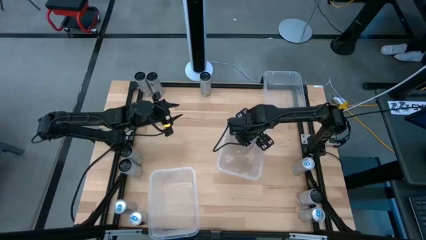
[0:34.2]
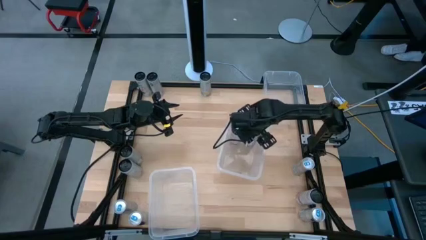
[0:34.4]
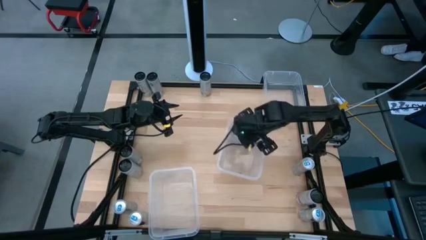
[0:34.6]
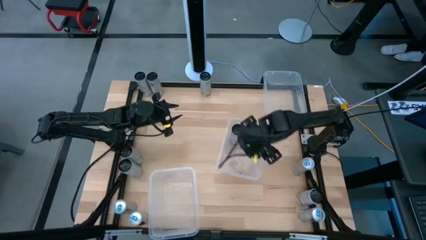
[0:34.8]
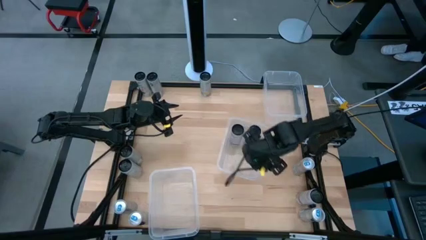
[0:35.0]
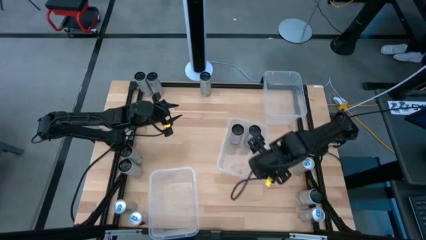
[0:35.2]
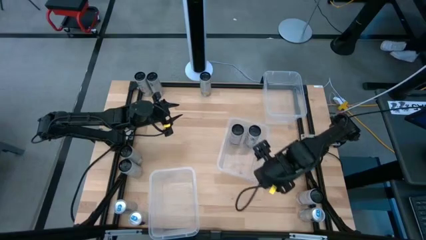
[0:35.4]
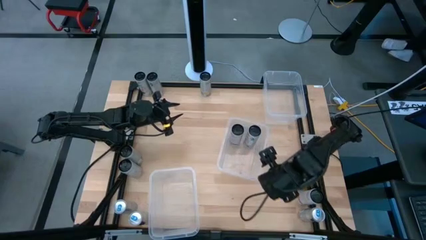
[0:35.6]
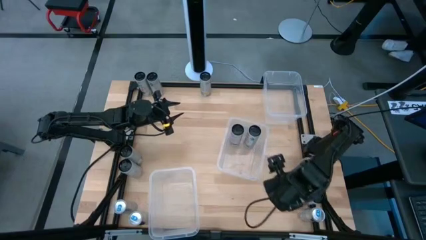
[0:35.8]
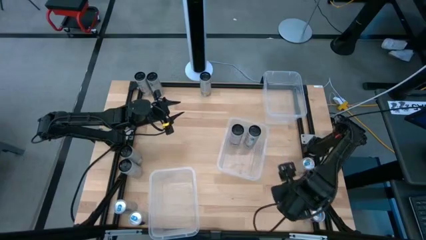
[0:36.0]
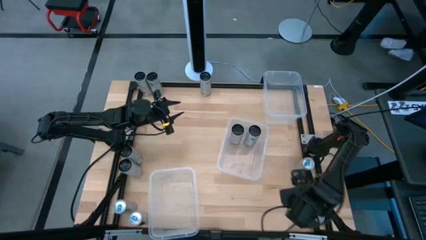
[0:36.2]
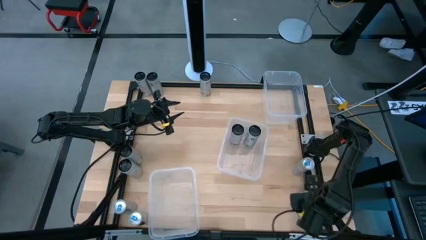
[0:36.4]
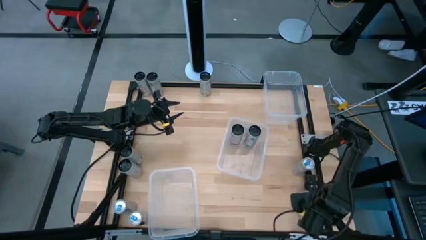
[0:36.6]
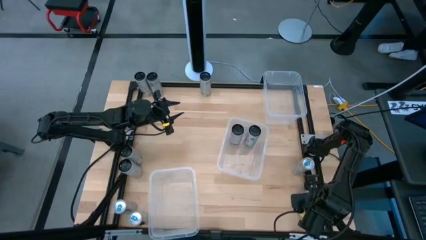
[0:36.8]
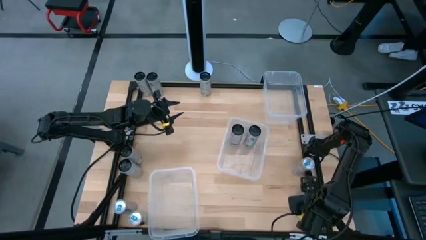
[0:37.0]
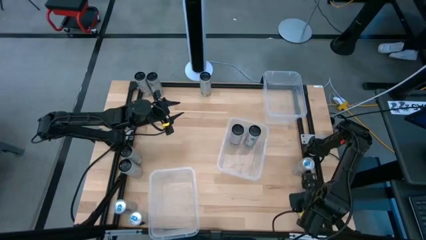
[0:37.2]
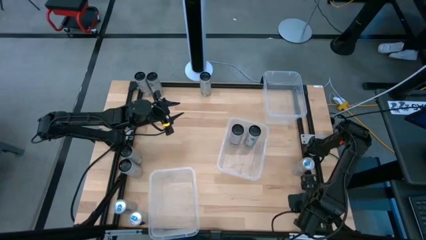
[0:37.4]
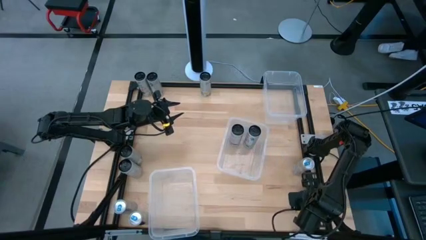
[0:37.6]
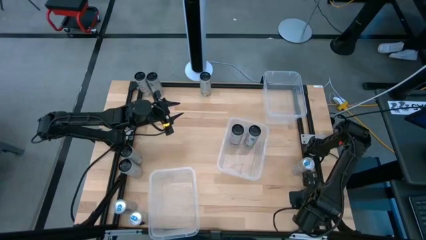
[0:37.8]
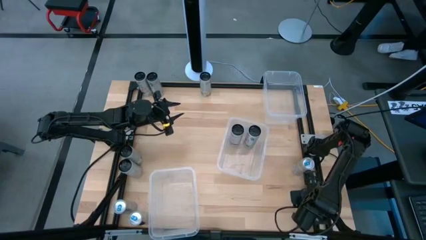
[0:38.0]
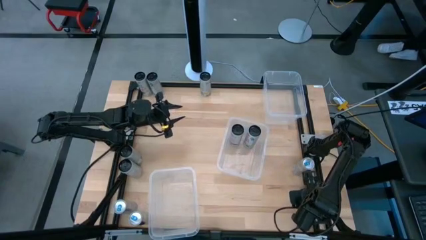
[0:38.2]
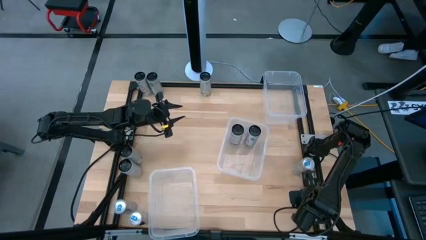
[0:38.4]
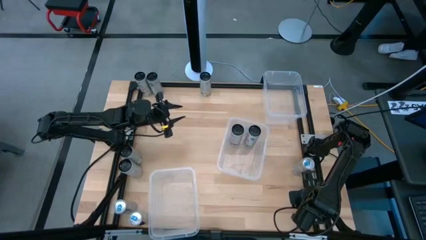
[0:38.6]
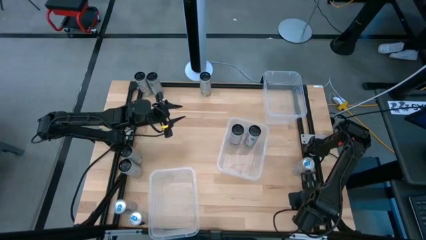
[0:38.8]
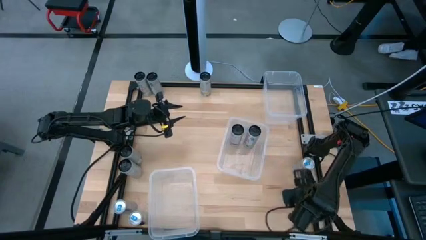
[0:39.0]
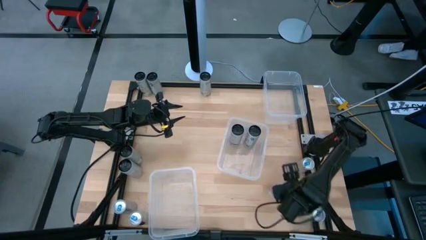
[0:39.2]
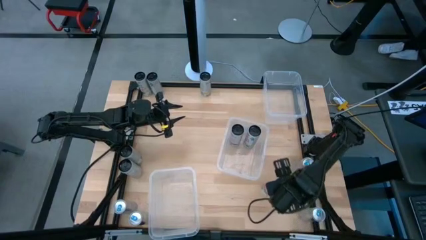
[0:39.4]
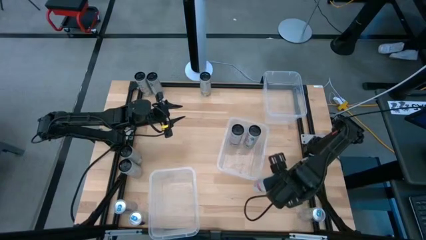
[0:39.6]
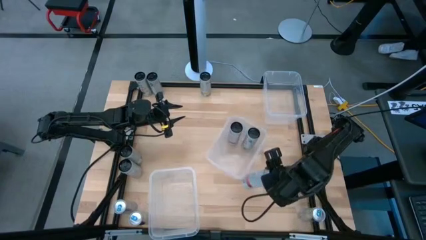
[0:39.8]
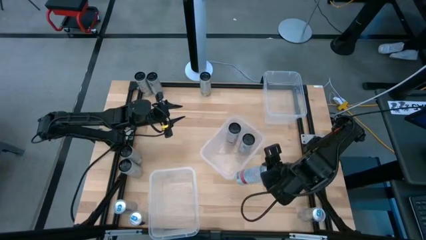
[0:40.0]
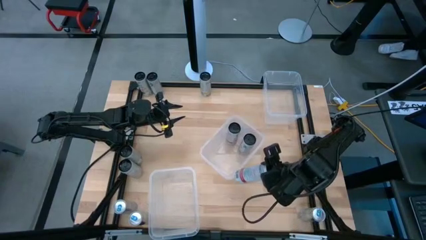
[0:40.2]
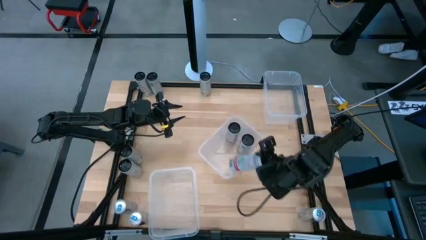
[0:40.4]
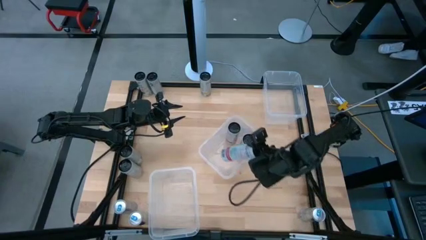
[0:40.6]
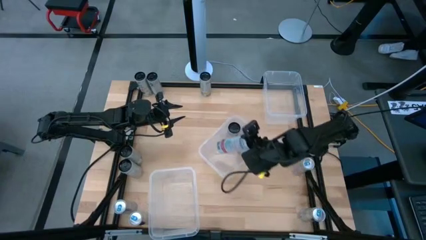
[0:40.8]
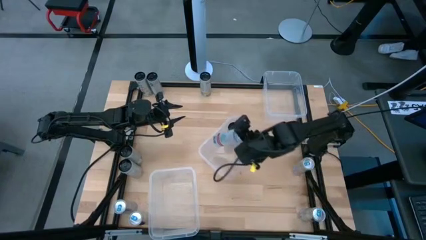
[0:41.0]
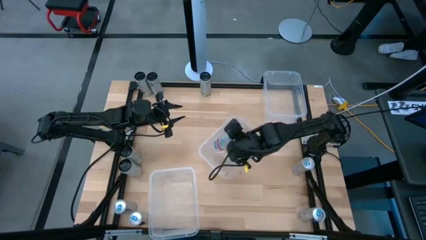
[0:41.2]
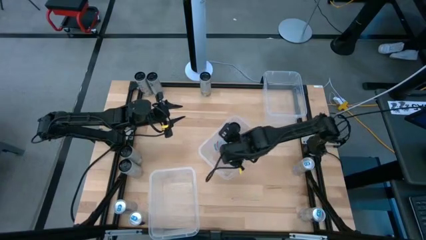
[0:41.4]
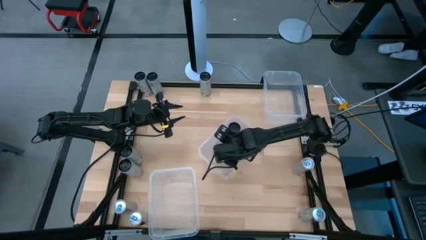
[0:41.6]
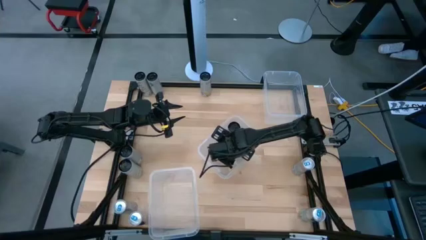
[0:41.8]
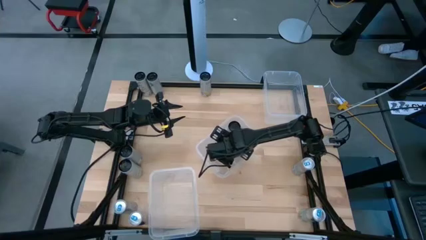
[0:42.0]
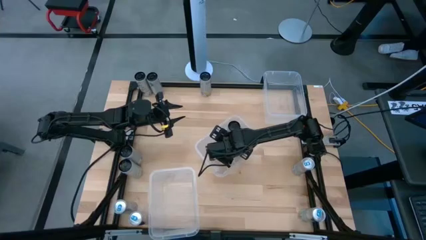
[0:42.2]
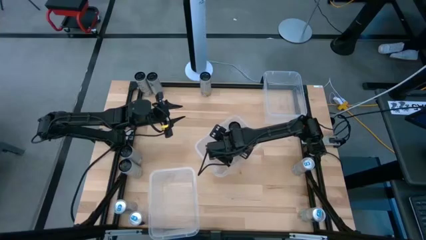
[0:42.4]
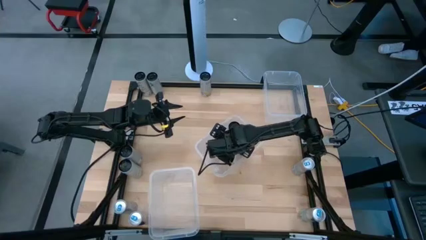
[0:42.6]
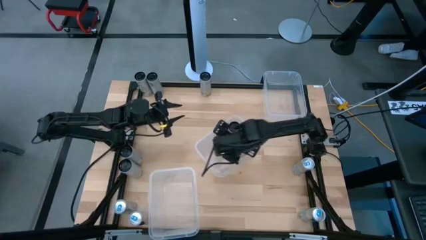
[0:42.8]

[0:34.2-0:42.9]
Task: Sort soda cans
Put the bottom right white and black peach soda can into the middle transparent bin

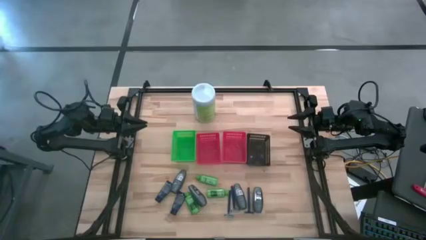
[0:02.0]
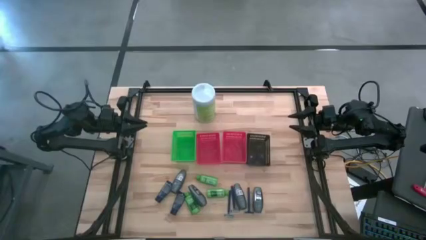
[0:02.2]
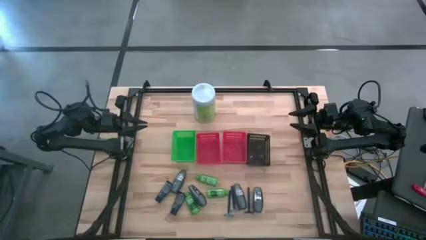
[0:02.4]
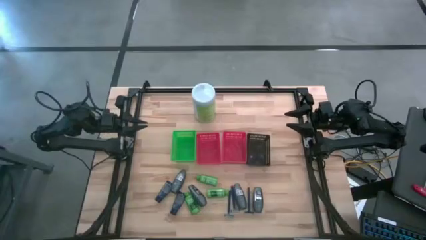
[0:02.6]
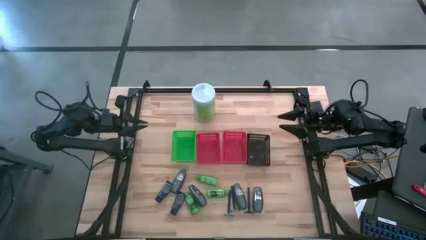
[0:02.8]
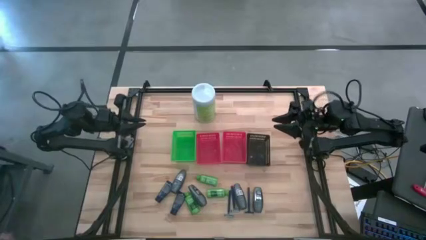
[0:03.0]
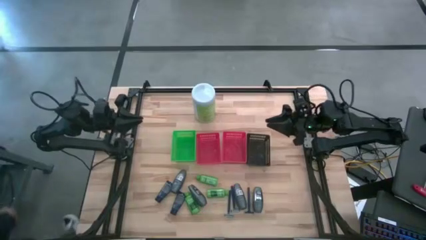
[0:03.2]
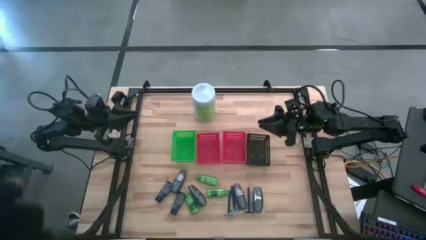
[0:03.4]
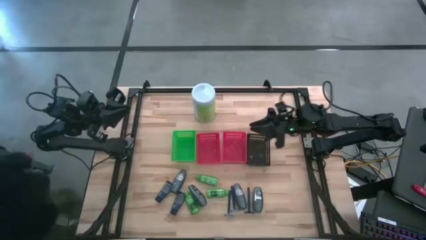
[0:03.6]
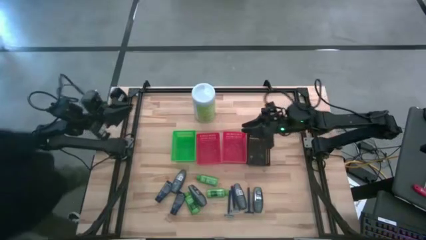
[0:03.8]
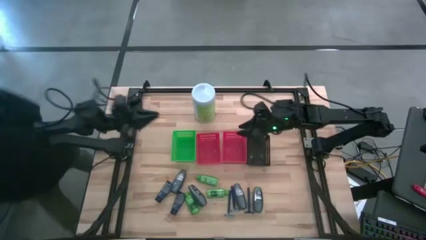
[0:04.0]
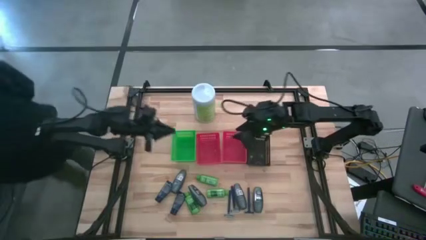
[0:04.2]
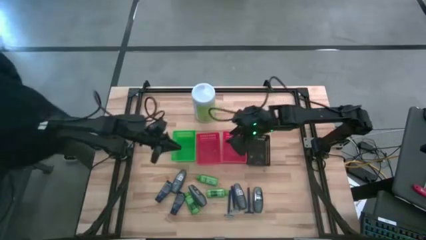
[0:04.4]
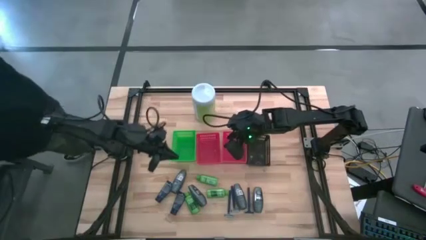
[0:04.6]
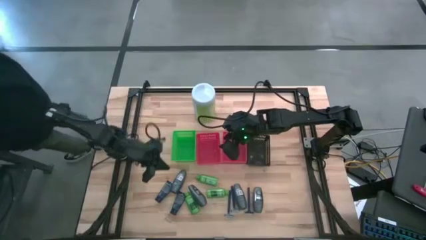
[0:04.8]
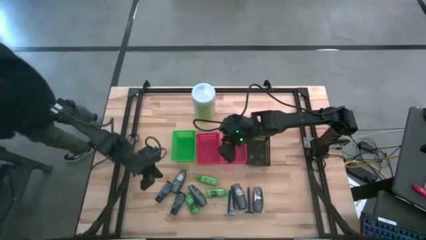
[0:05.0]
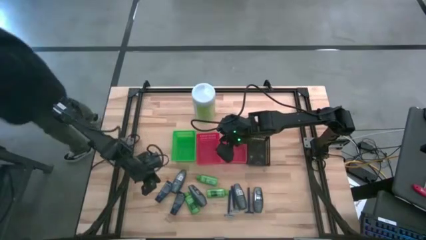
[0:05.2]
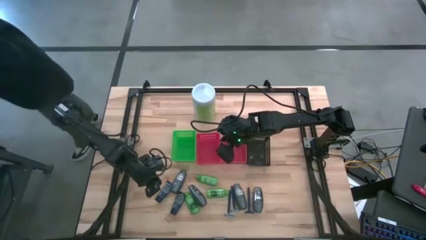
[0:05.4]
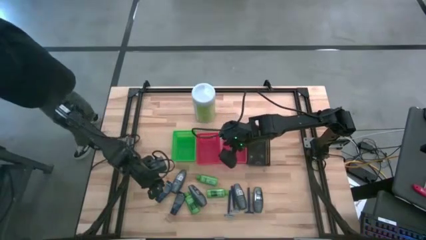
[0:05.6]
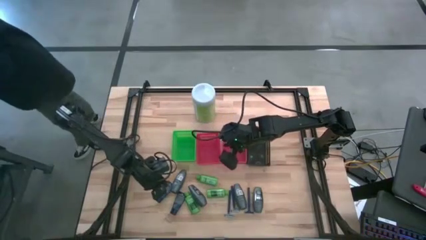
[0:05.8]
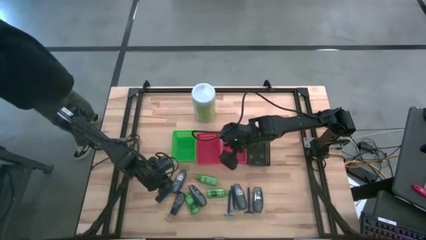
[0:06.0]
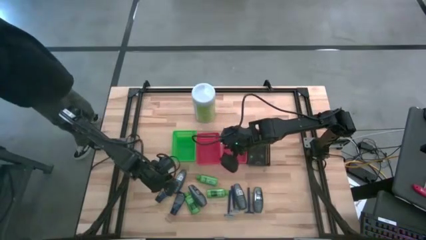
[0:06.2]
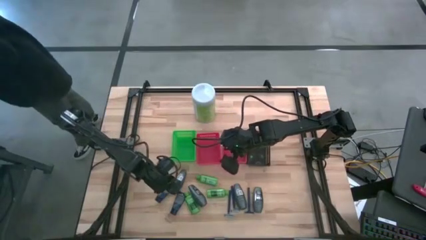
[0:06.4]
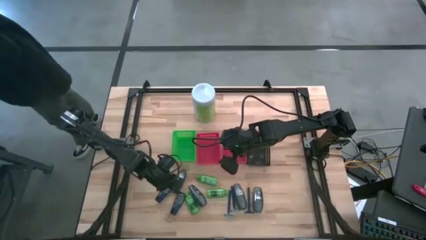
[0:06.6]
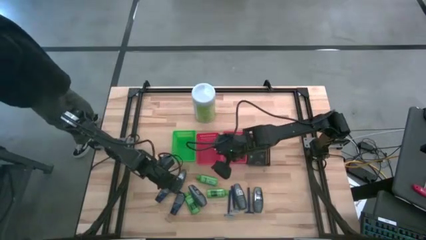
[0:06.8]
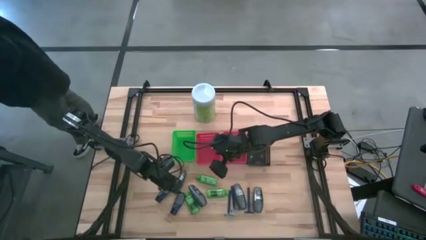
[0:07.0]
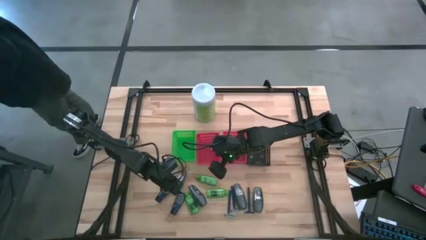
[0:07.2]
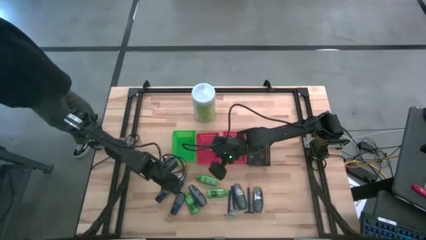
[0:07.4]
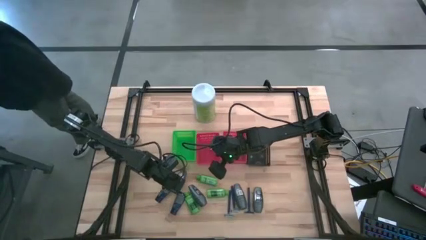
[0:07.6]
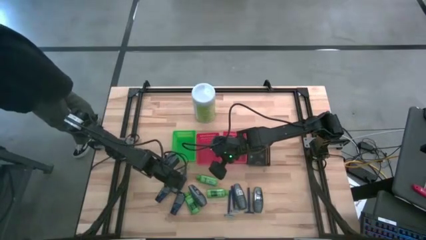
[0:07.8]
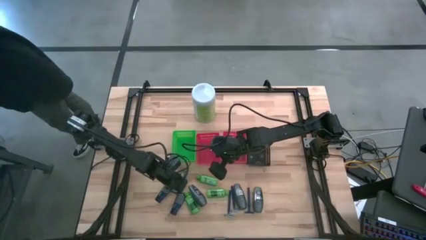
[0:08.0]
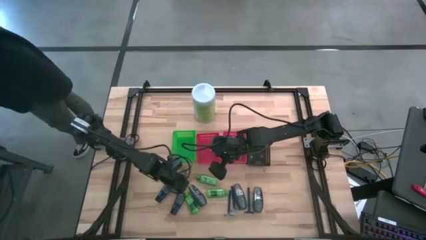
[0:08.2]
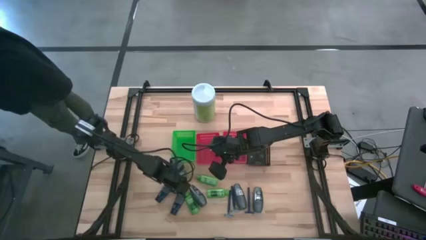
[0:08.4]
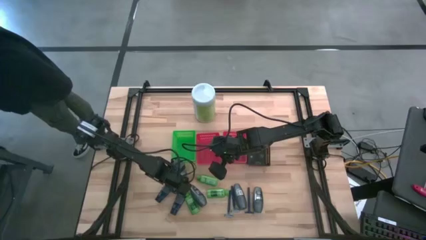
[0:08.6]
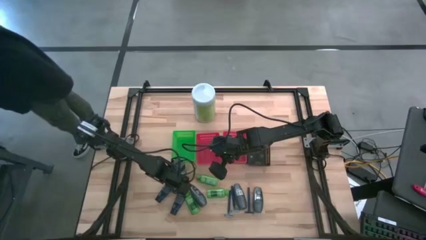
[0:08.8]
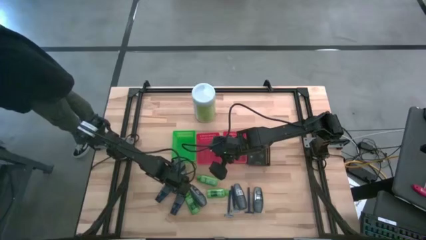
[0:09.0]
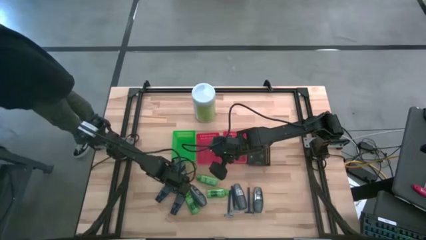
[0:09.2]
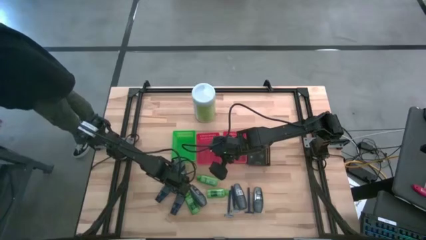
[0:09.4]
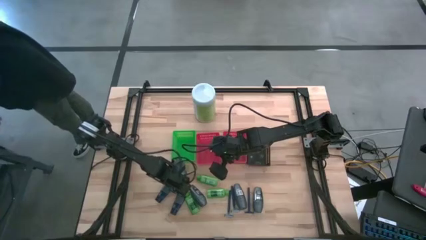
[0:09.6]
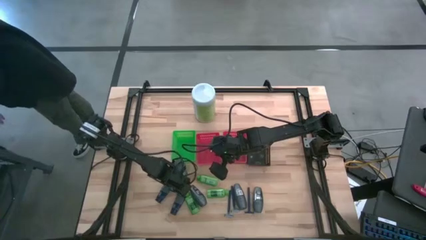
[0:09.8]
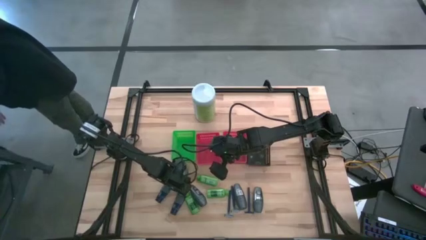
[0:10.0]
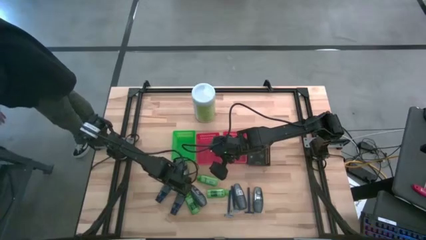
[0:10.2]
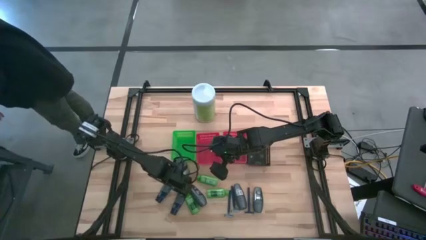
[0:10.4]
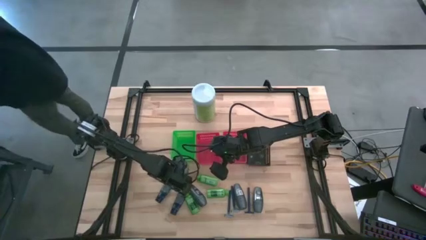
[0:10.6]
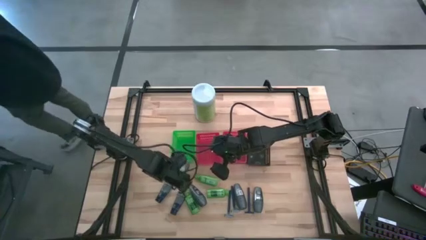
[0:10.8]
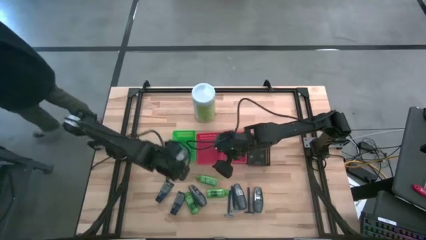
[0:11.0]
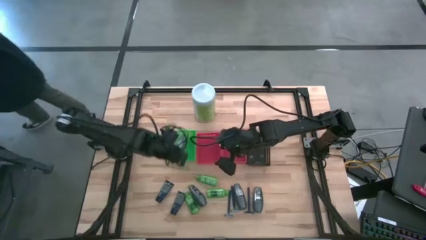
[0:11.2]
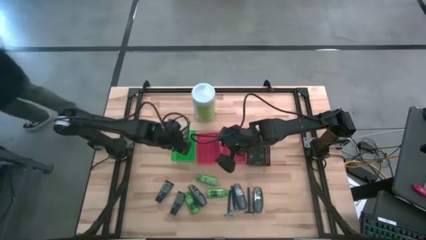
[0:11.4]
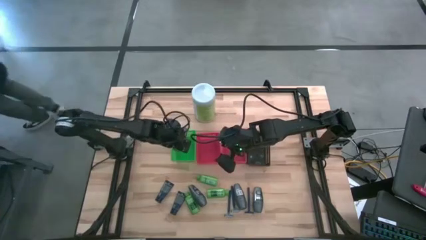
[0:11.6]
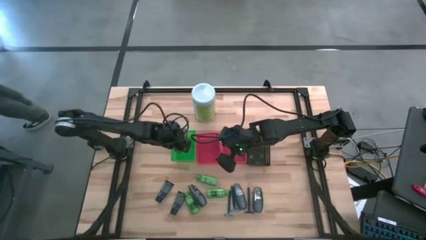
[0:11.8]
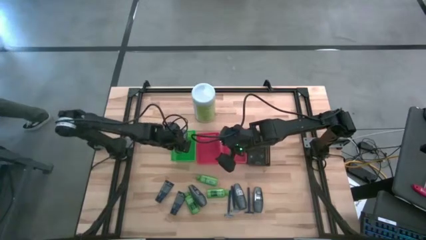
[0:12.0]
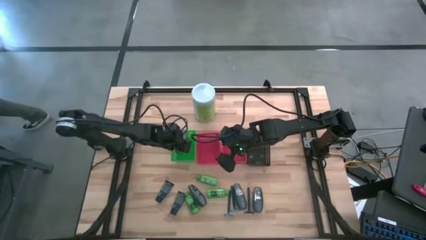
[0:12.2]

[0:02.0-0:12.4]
Task: Pick & Place Travel size toiletries
Put the black deodorant into the green bin
